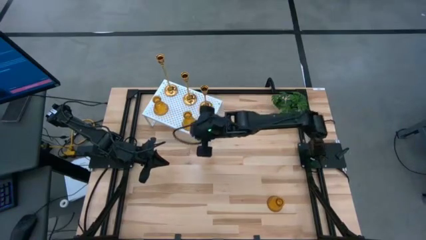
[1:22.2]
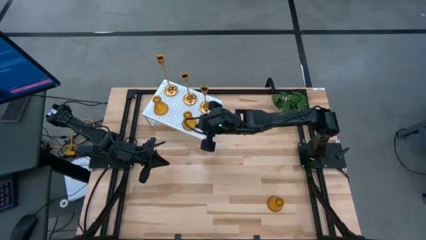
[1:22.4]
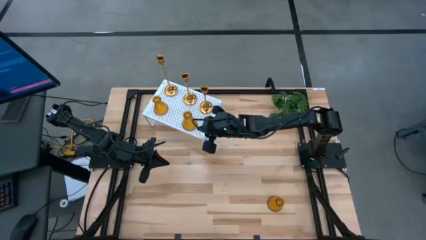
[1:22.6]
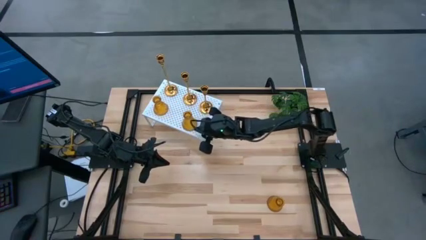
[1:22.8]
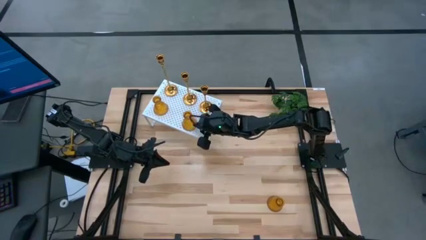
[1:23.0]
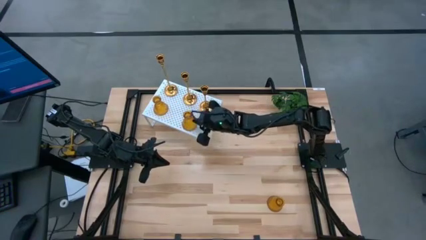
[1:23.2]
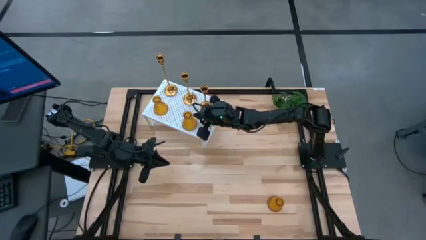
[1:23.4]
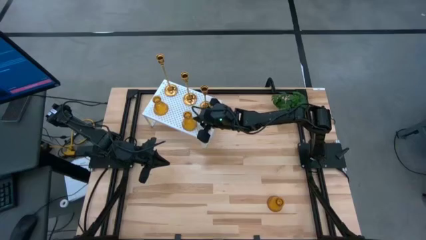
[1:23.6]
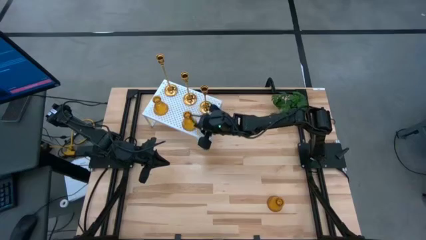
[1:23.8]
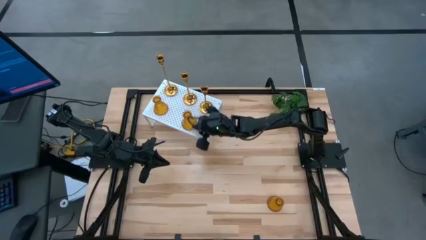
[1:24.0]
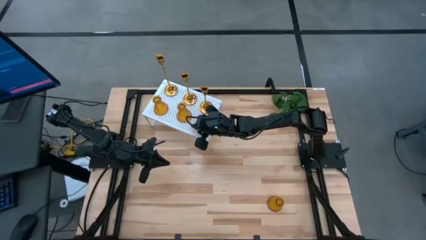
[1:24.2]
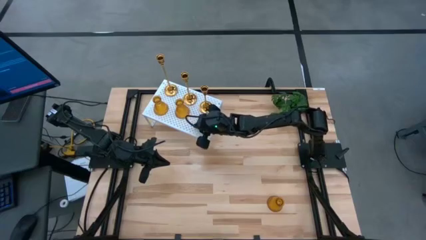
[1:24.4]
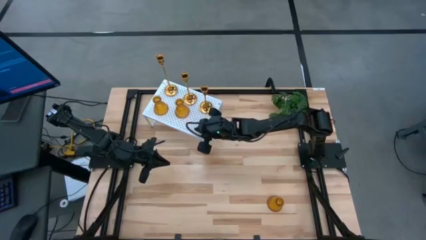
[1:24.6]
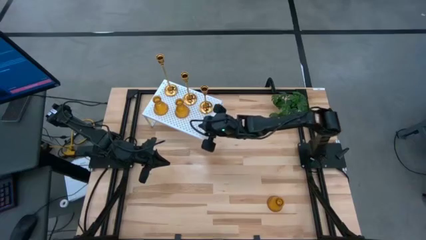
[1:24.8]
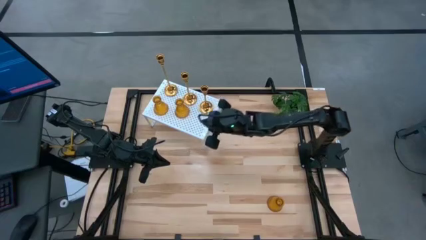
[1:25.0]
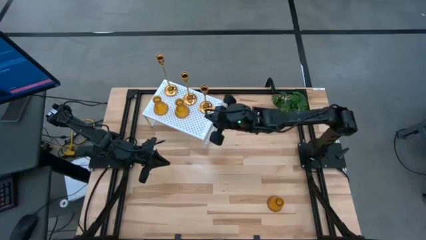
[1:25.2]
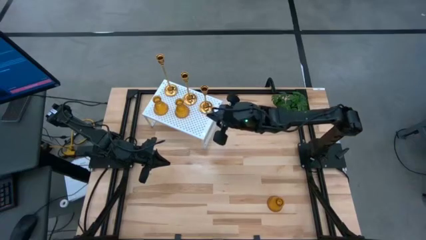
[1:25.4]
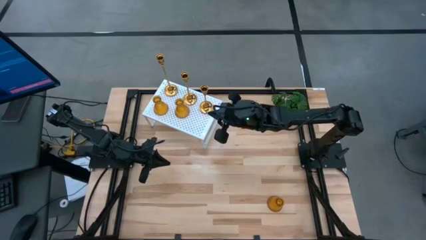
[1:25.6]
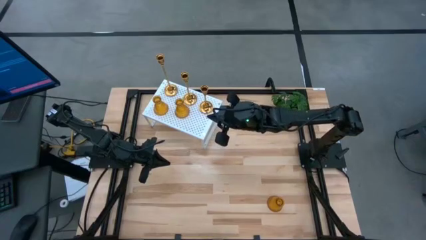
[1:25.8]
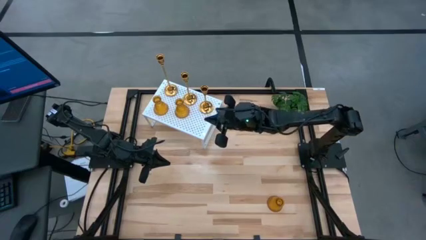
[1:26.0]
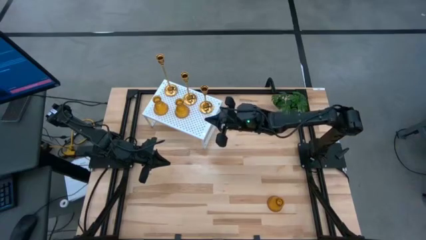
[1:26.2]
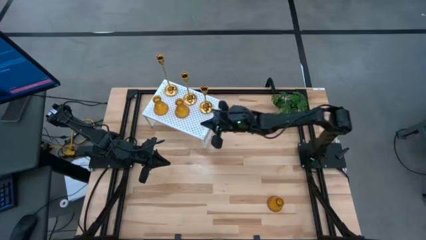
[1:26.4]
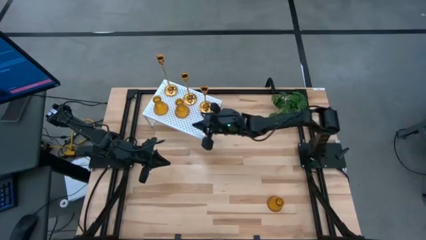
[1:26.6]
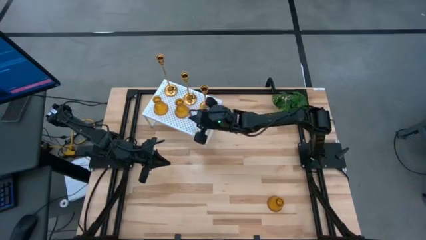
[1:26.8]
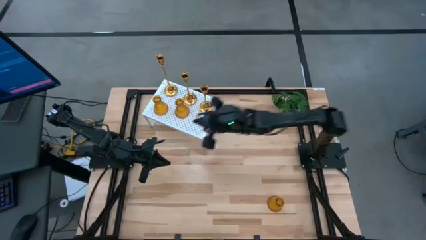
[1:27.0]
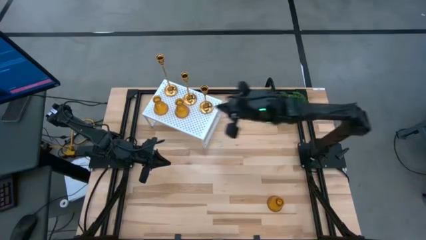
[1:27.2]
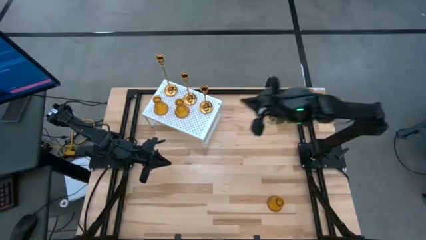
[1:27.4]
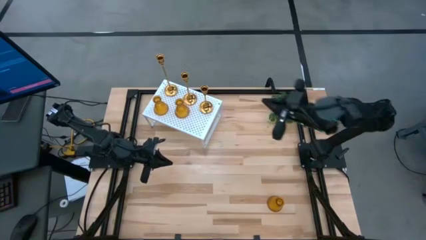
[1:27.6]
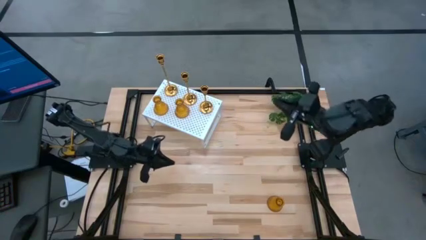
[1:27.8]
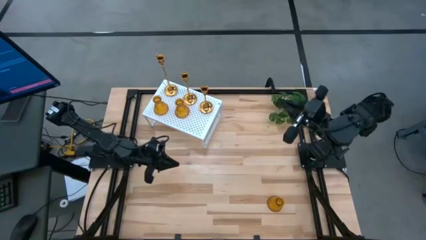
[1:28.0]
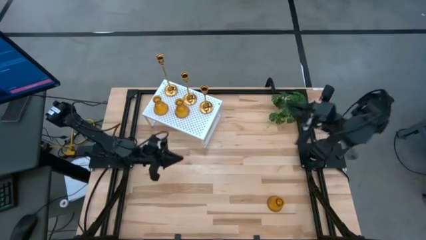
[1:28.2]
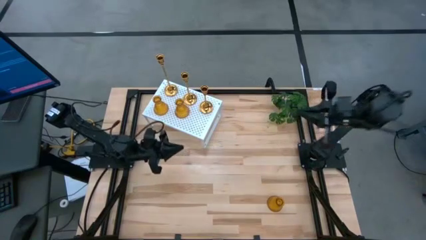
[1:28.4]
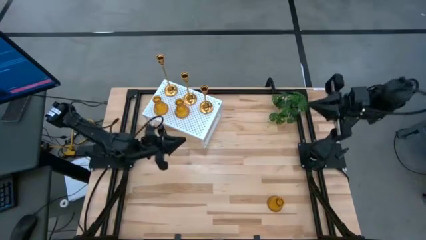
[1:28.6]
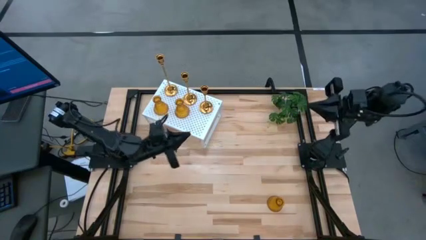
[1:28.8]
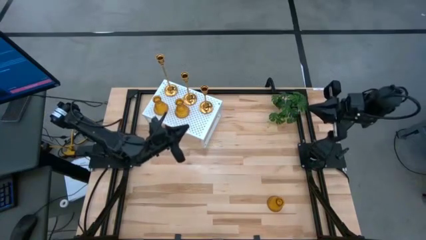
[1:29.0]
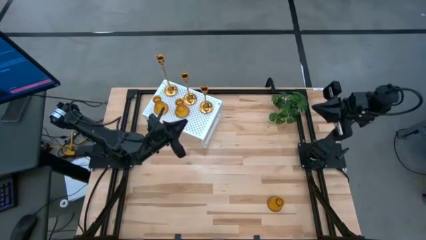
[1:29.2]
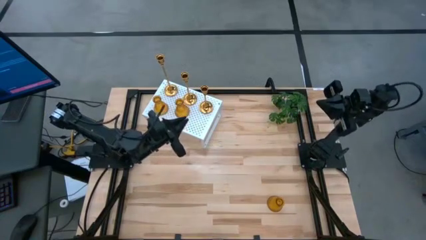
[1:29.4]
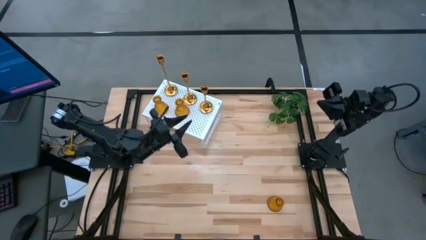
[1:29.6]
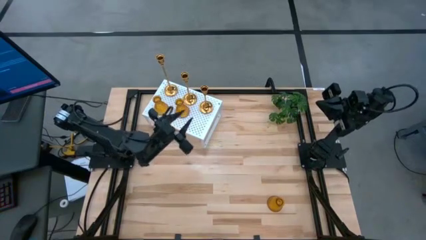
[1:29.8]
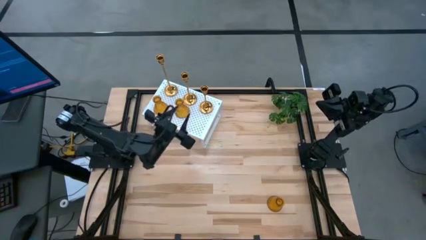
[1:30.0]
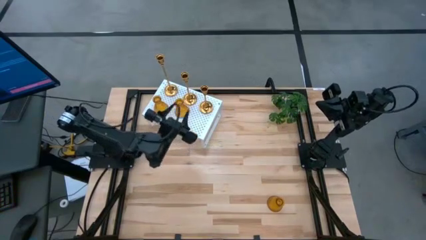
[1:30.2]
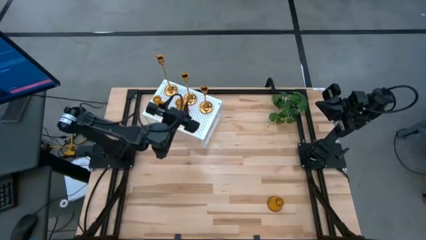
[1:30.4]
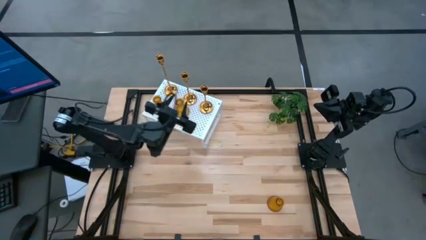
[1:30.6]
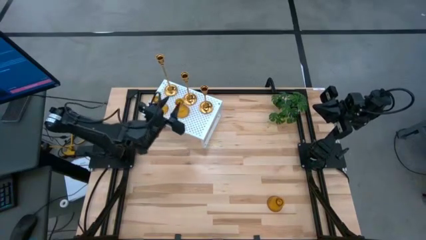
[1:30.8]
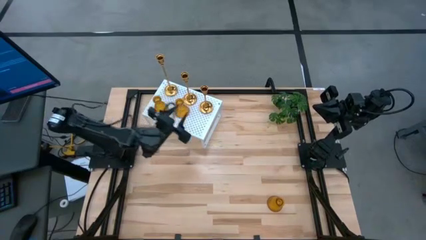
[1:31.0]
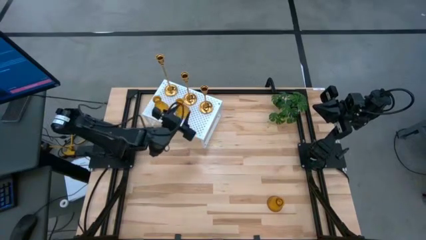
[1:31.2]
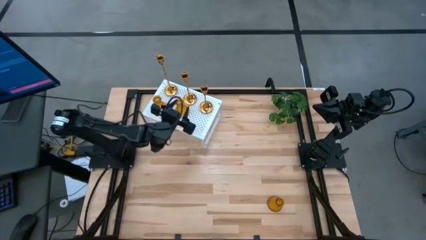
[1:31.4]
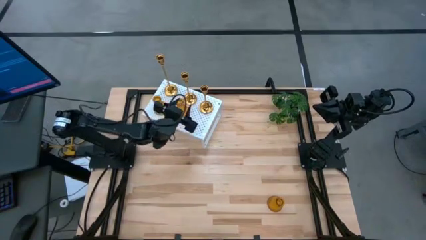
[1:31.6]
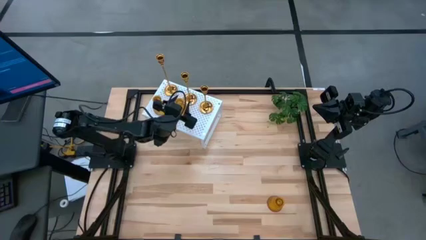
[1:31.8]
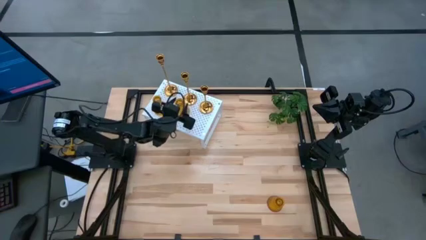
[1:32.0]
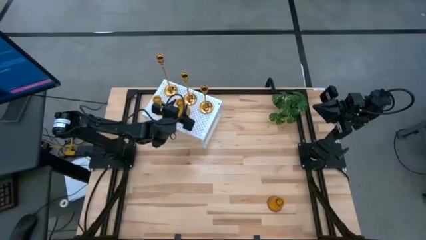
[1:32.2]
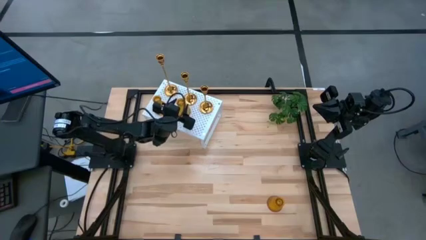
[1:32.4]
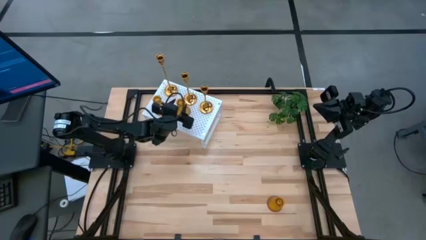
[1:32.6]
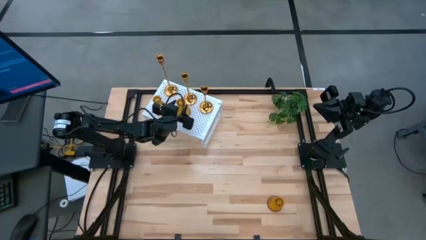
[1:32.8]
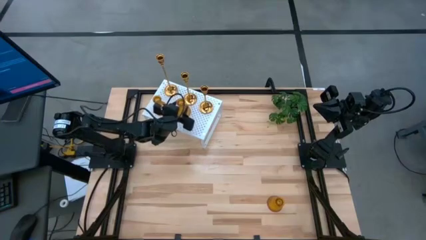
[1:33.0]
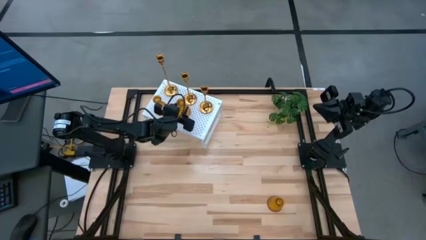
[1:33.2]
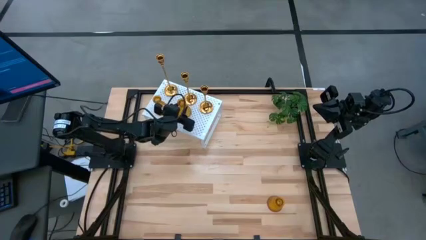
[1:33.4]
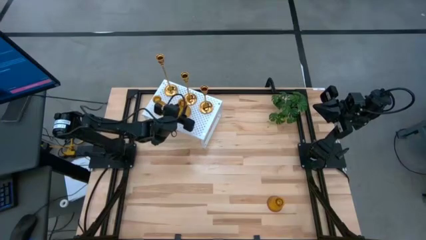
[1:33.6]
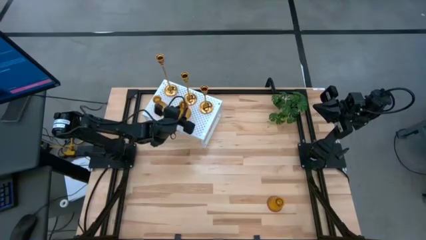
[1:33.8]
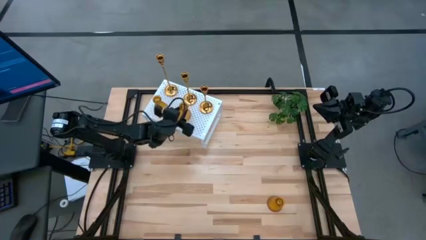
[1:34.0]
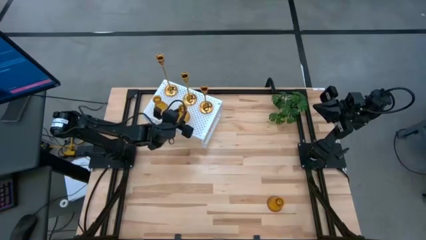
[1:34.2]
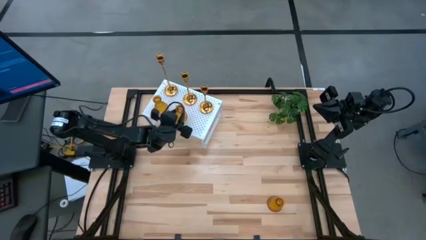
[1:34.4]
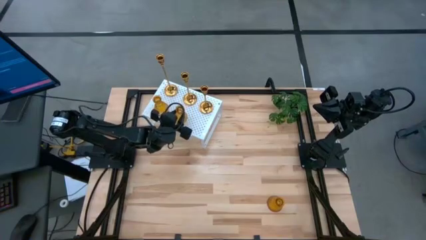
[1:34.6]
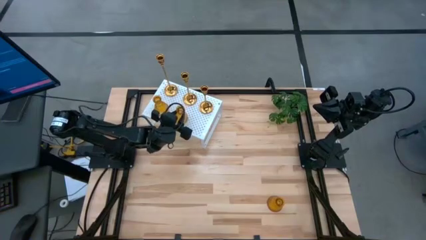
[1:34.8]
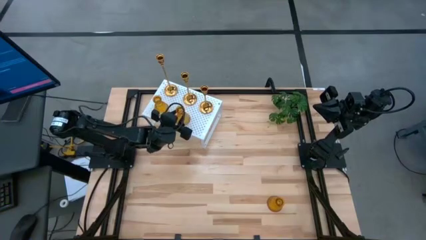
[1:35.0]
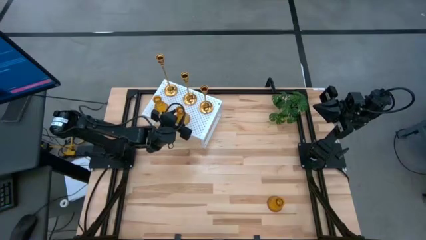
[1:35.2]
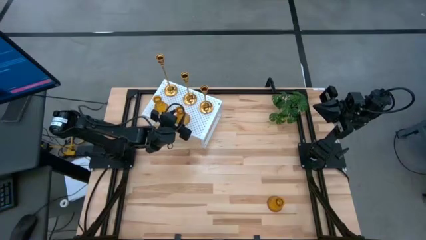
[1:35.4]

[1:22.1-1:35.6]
Task: Pick & Place candle stick holders
Put the top brown glass candle holder on the shelf aligned with the other brown glass candle holder

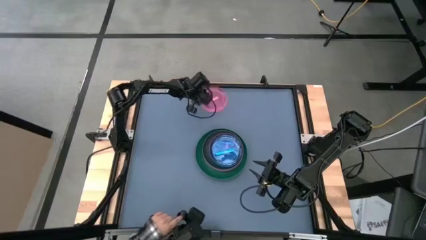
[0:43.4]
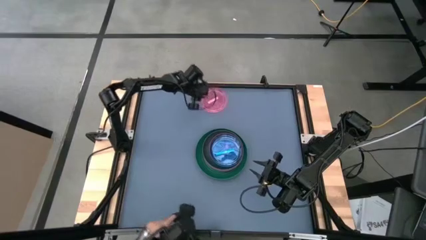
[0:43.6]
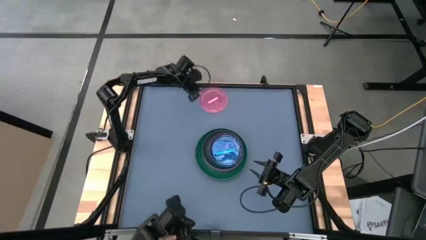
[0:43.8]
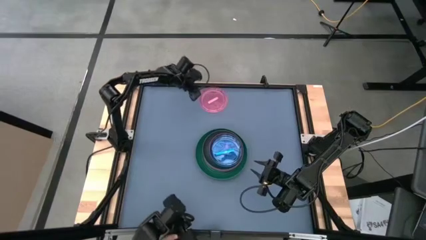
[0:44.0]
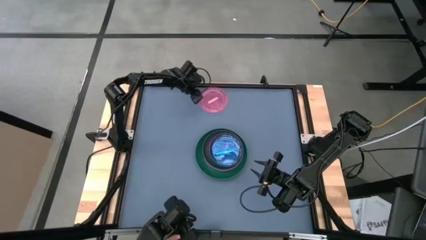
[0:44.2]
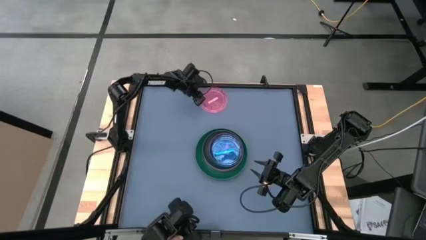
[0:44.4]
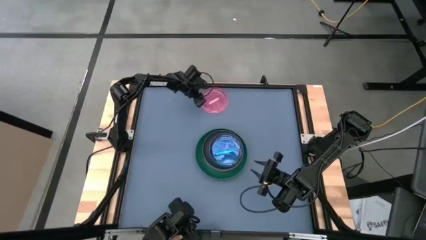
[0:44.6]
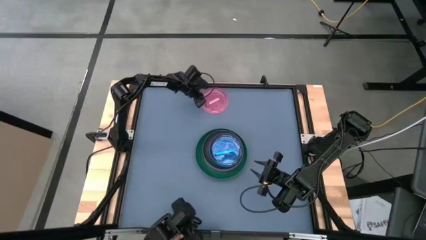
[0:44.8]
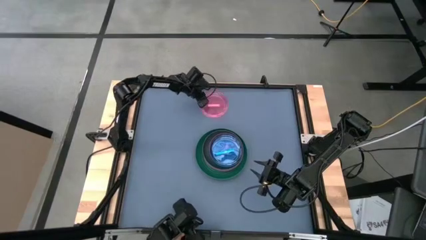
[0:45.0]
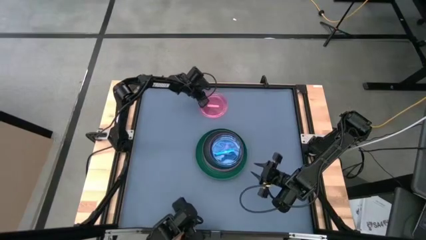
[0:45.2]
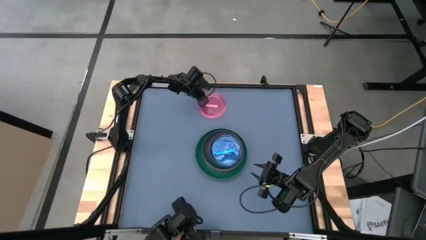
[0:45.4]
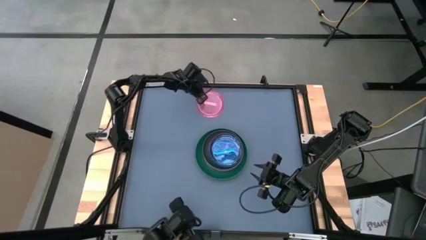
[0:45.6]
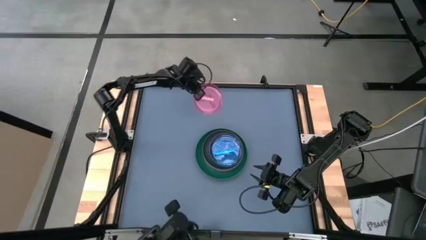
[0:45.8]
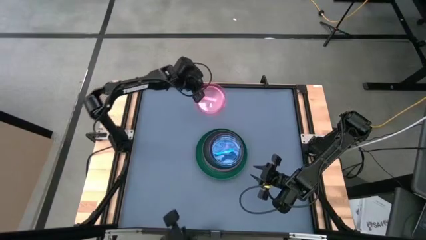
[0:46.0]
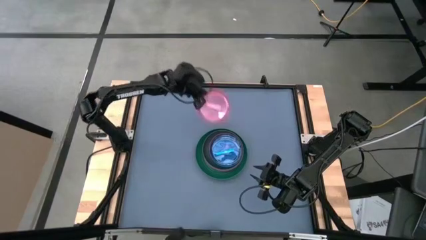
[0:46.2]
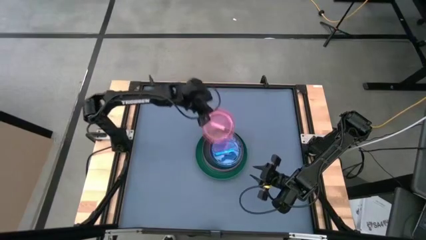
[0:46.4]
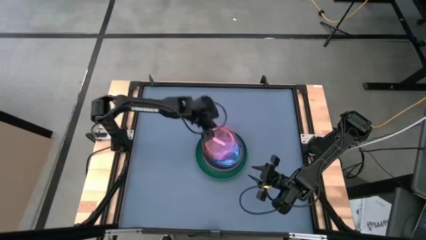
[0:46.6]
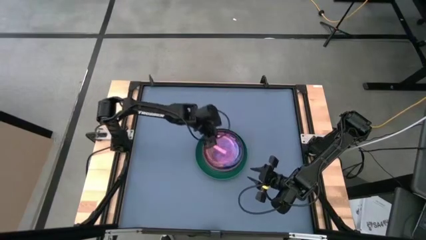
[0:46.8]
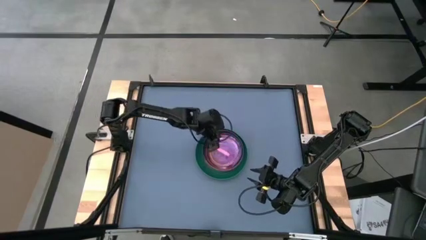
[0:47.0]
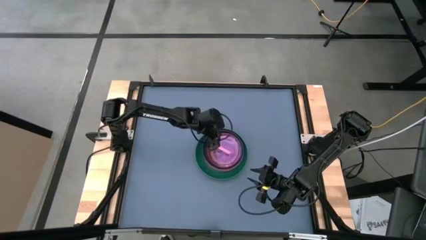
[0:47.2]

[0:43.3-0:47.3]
Task: Stack plastic plates
Stack the pink plate on top of the blue plate
